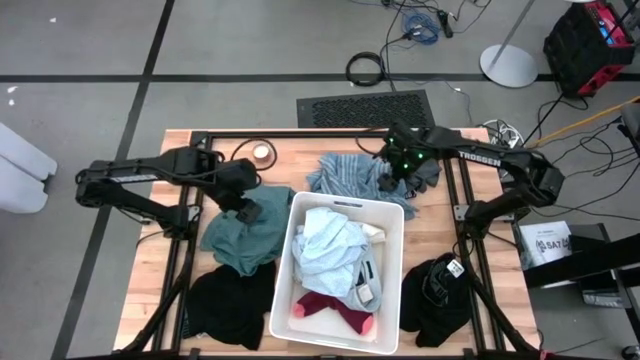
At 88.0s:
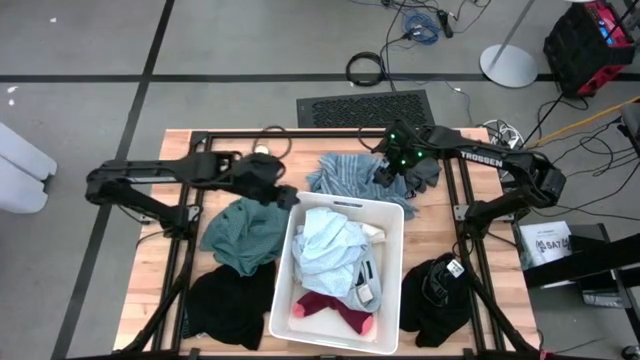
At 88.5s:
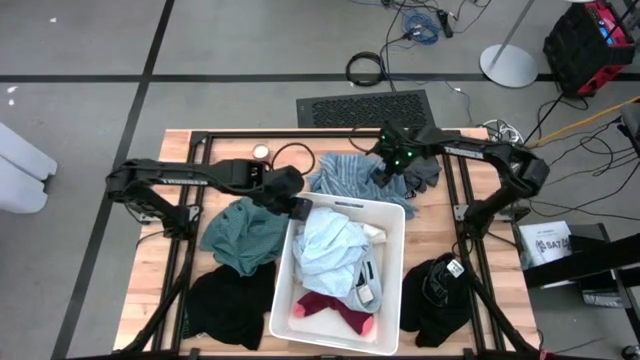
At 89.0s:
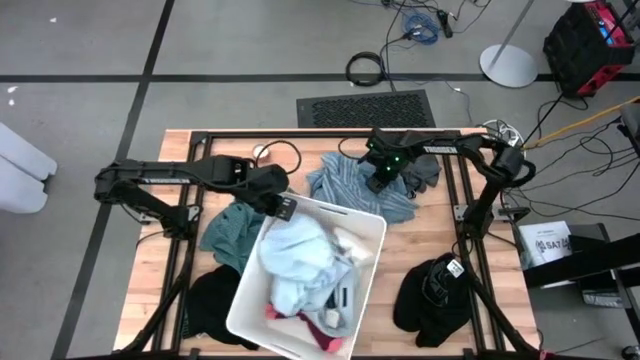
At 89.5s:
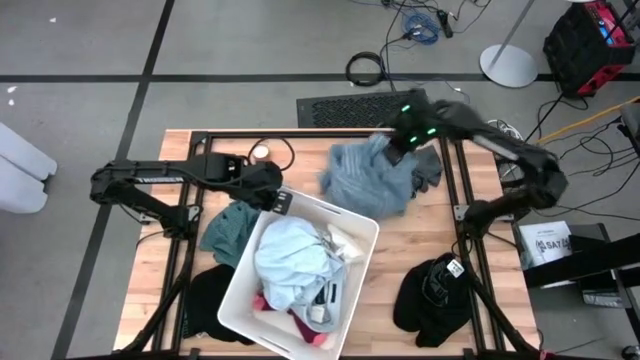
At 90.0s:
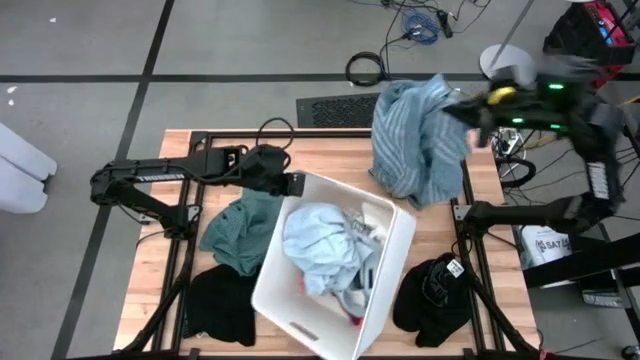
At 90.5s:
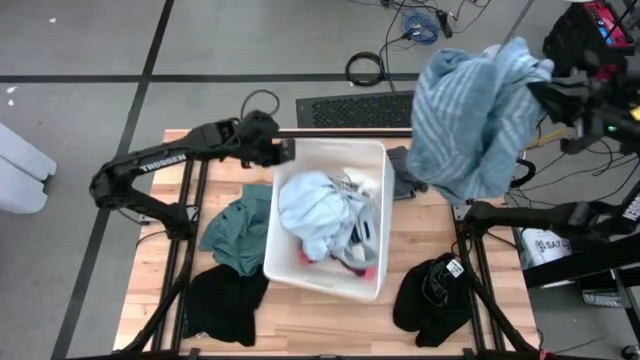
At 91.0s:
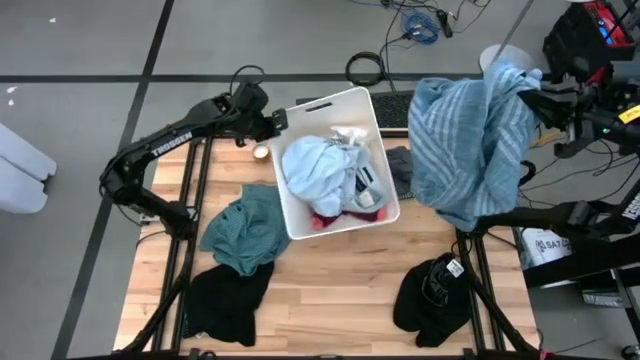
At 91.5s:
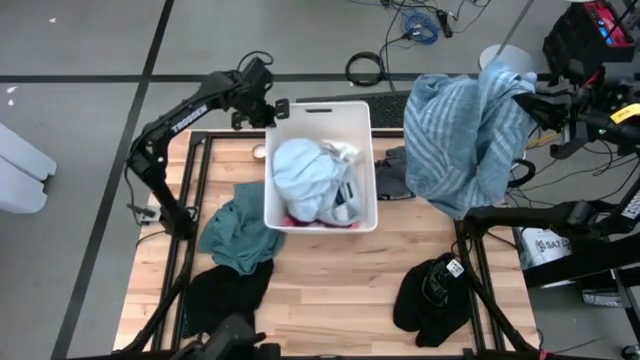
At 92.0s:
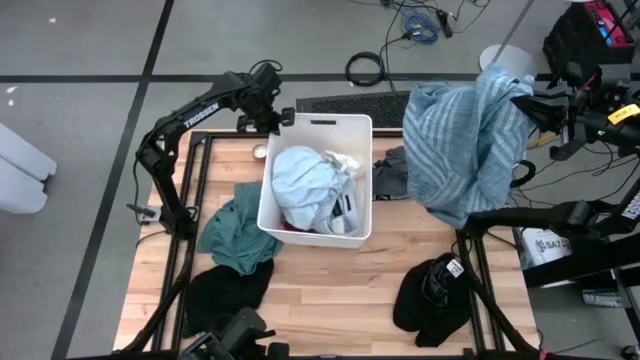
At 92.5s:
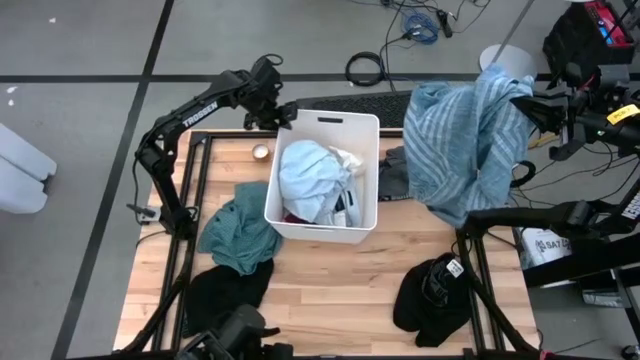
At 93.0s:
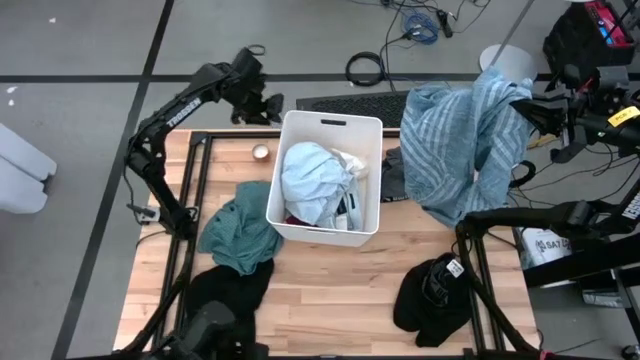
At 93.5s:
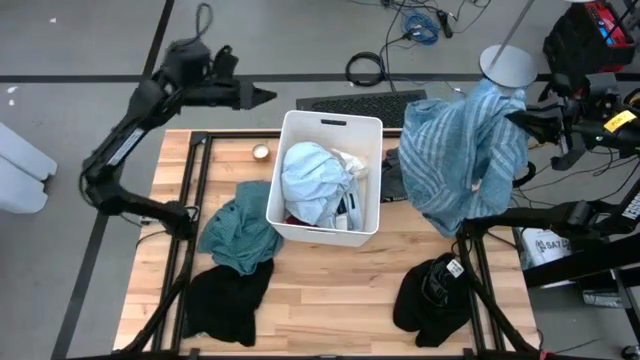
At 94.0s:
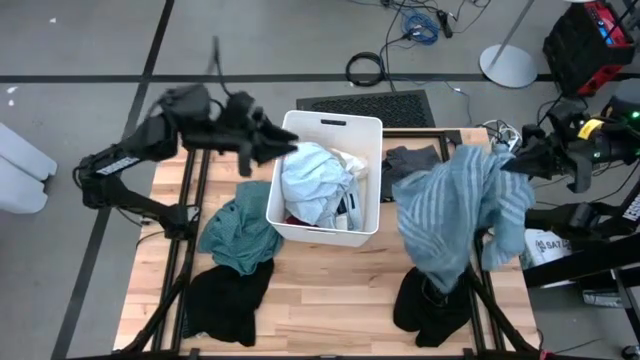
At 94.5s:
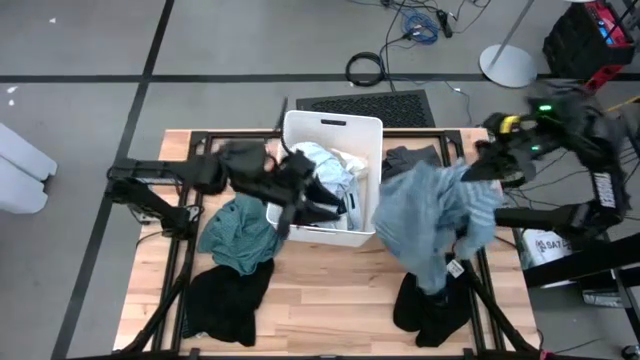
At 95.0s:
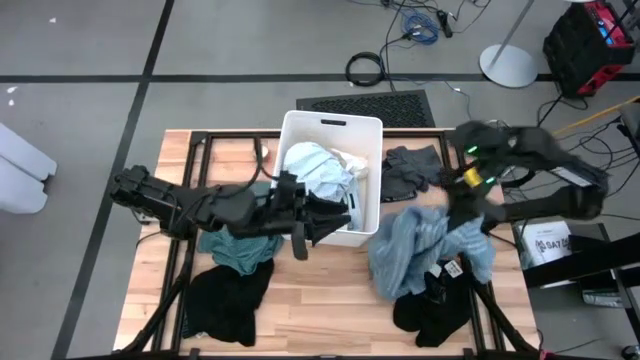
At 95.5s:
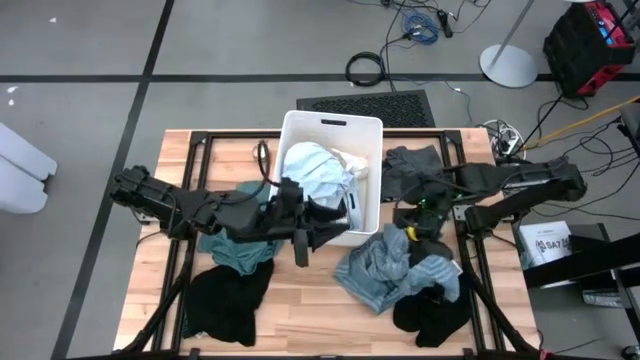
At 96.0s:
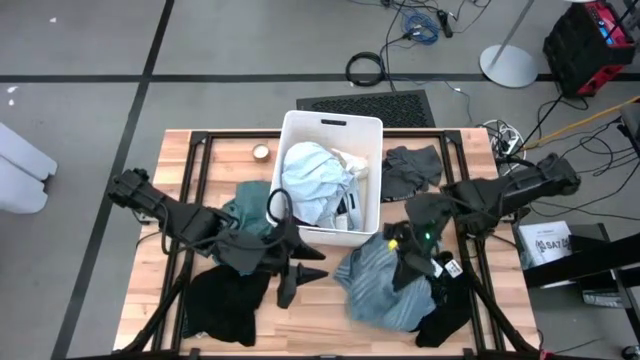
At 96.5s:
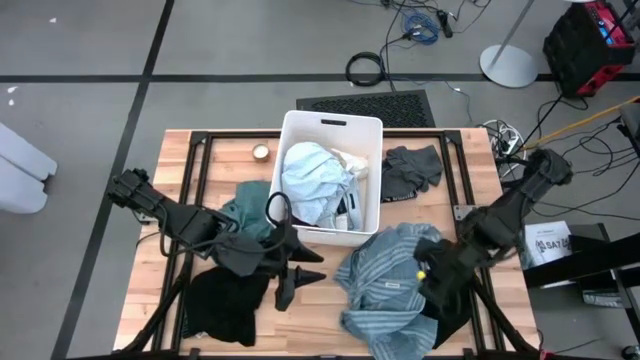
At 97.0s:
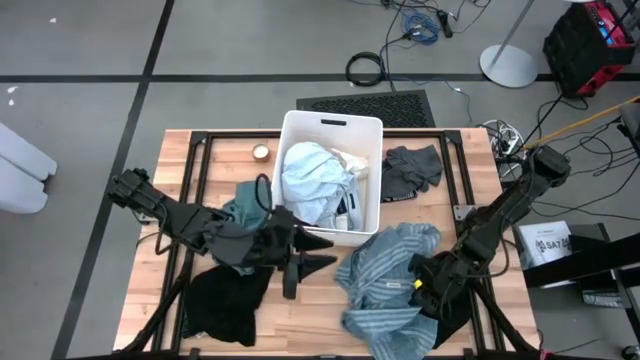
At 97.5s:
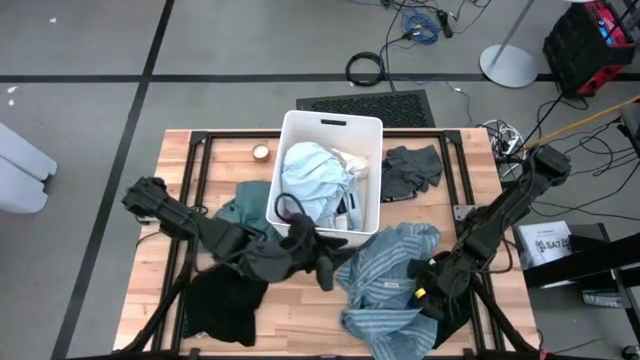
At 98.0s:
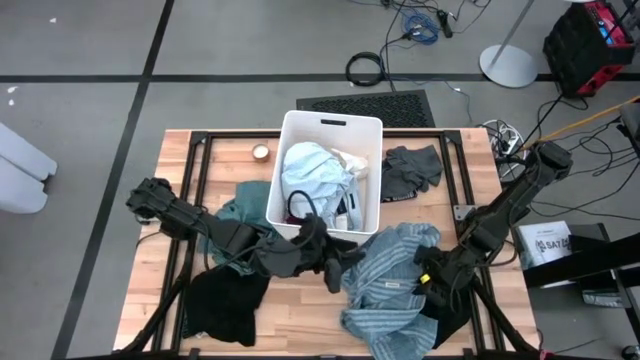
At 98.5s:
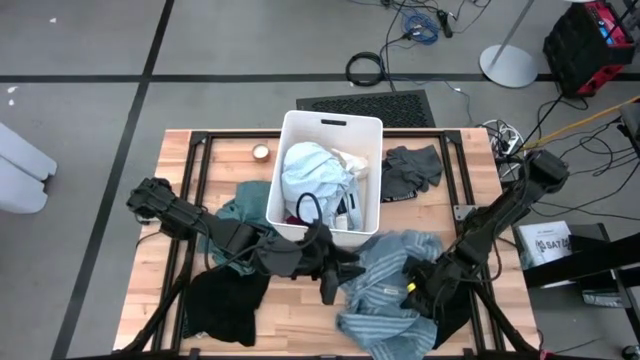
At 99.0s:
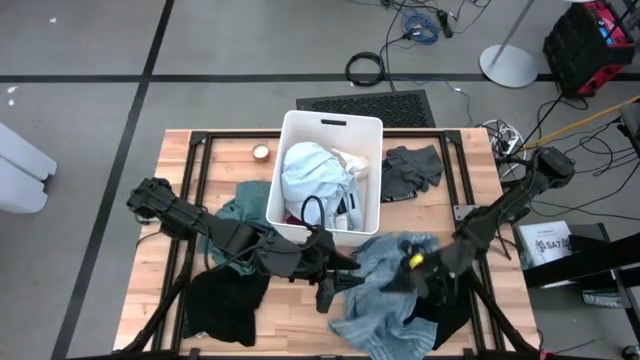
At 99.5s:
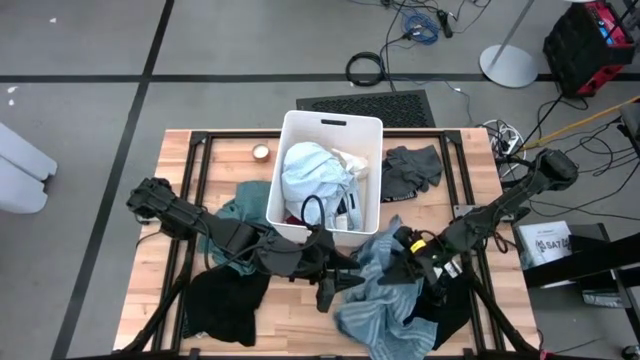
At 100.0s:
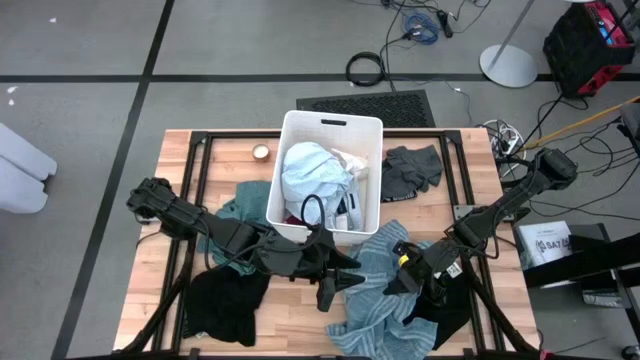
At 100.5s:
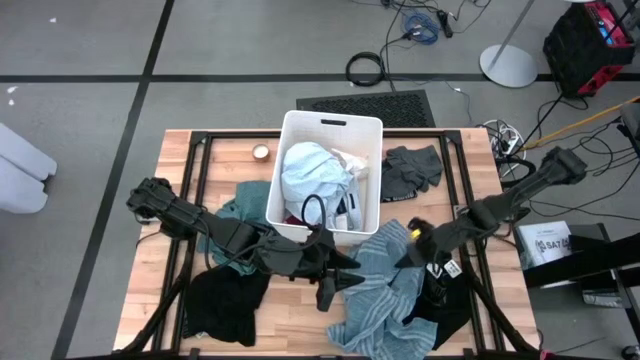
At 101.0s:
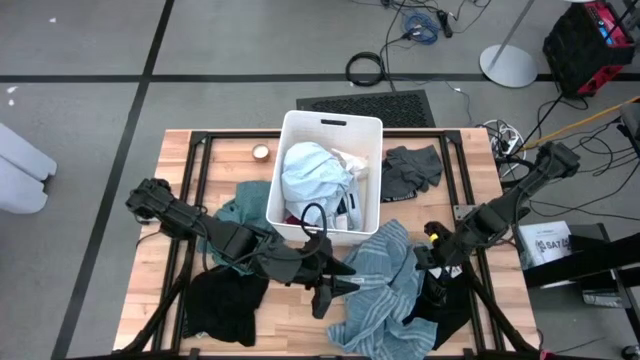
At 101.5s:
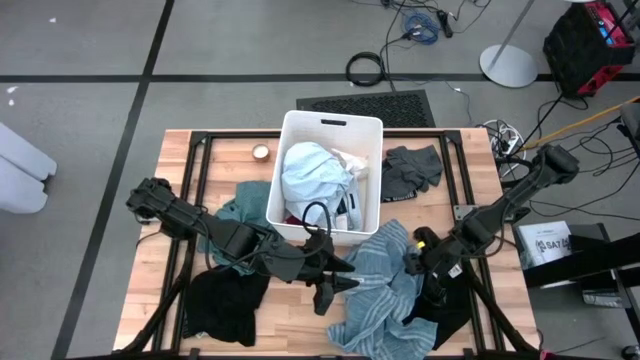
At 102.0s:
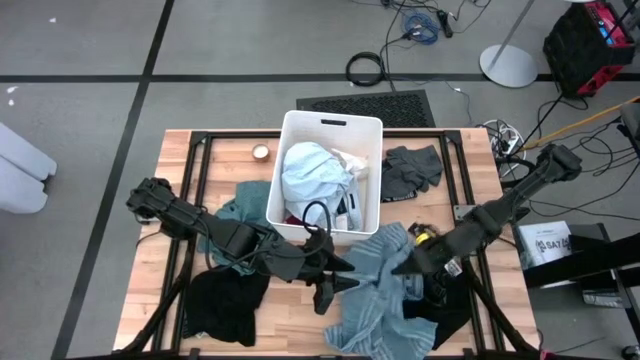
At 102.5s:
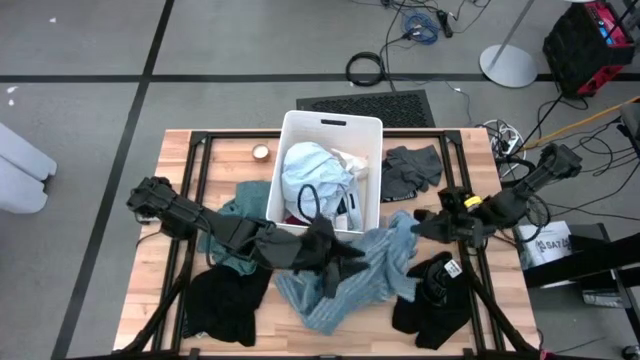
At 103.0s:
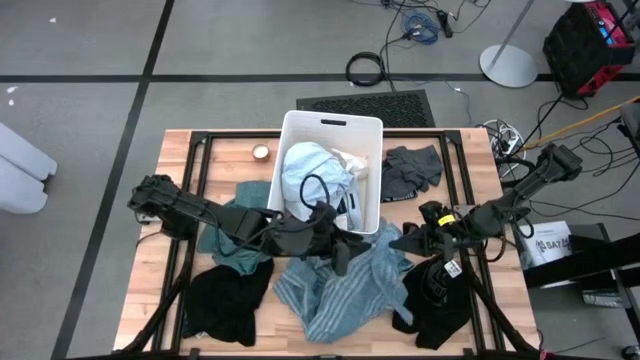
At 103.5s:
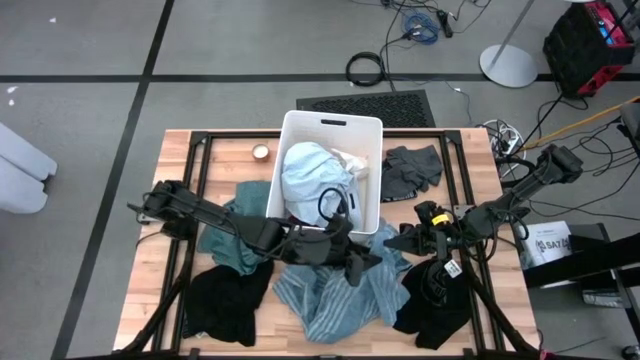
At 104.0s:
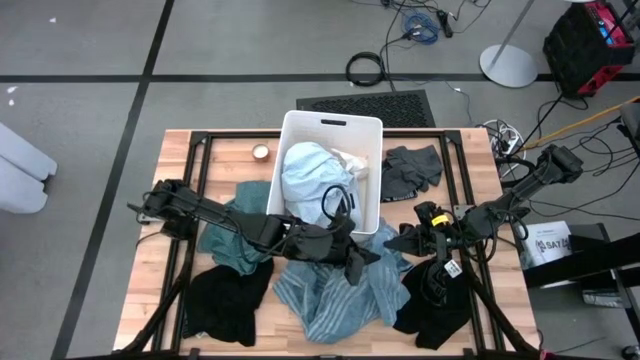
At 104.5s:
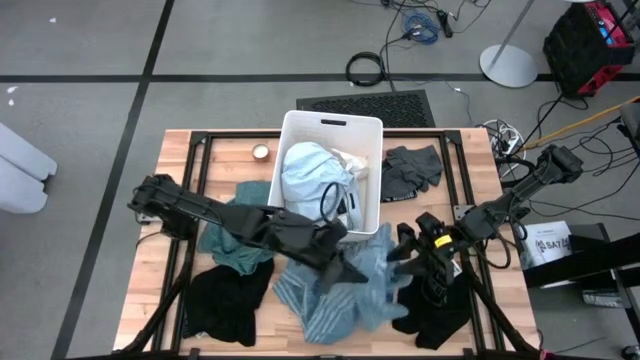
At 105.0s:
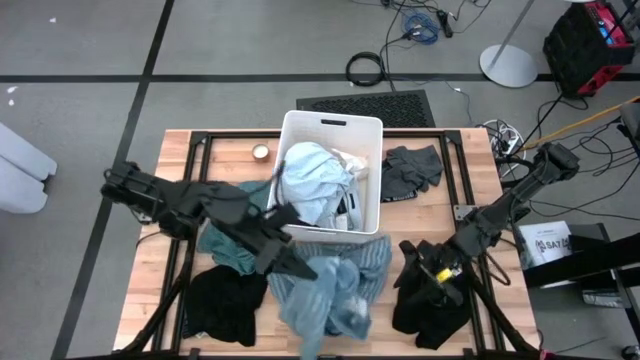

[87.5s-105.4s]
Task: Sort clothes
Put the blue polo shirt into the white laundry bin

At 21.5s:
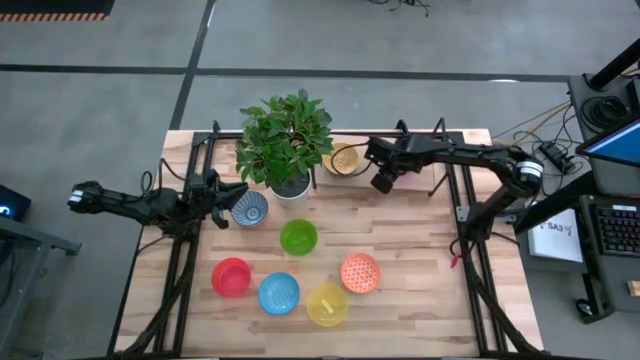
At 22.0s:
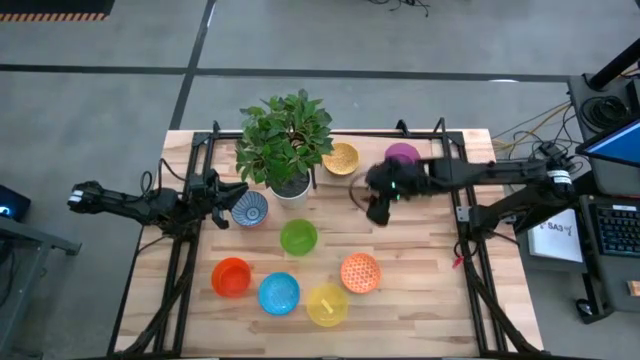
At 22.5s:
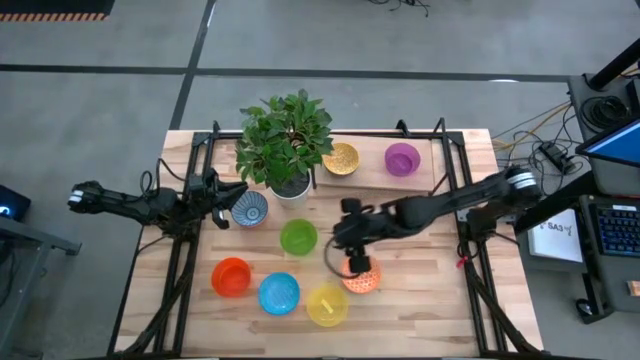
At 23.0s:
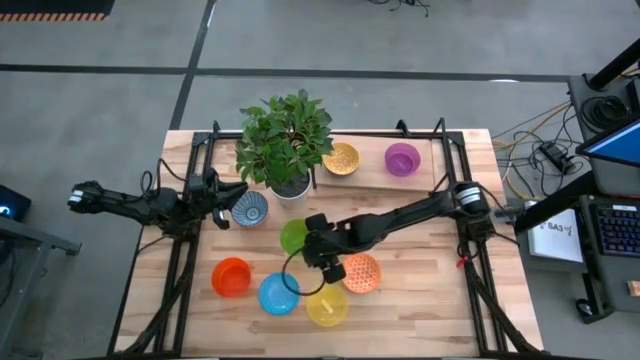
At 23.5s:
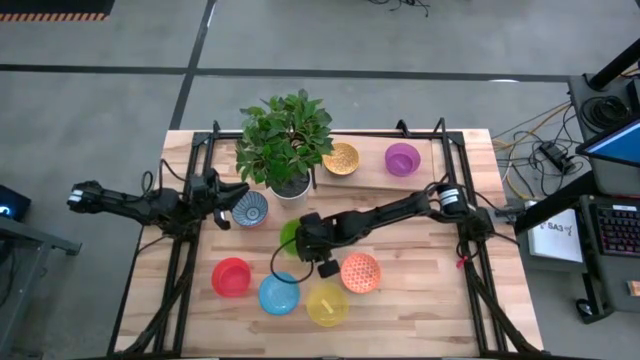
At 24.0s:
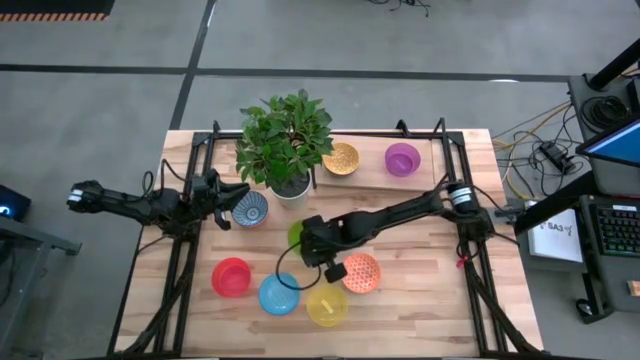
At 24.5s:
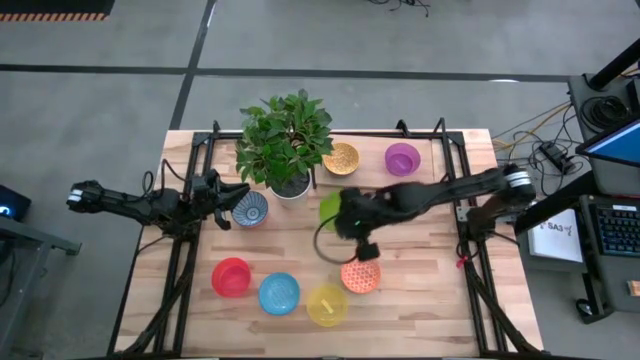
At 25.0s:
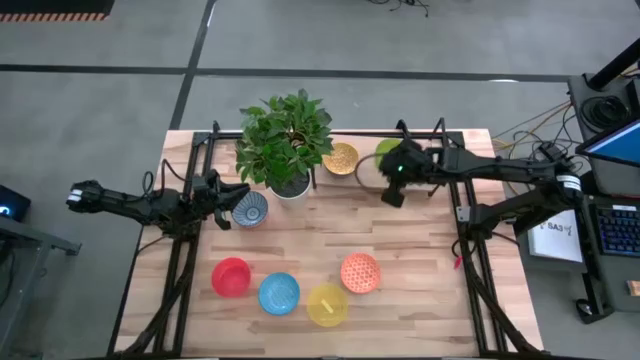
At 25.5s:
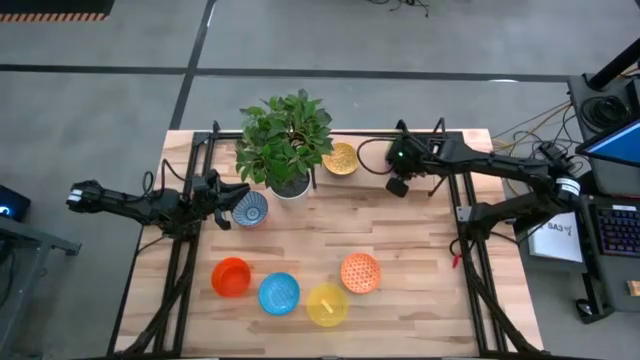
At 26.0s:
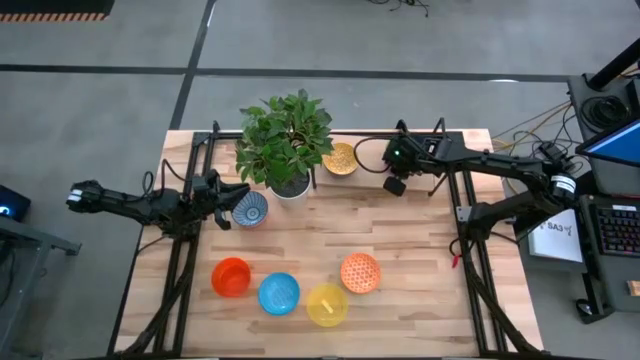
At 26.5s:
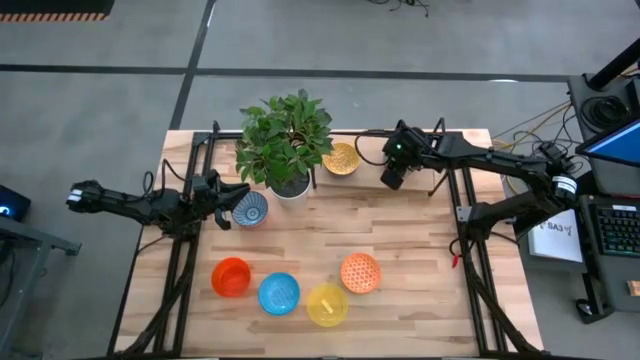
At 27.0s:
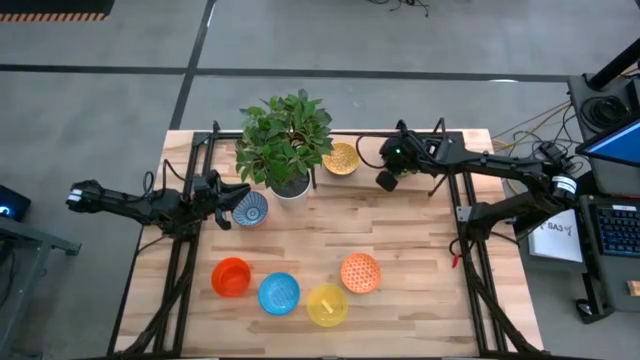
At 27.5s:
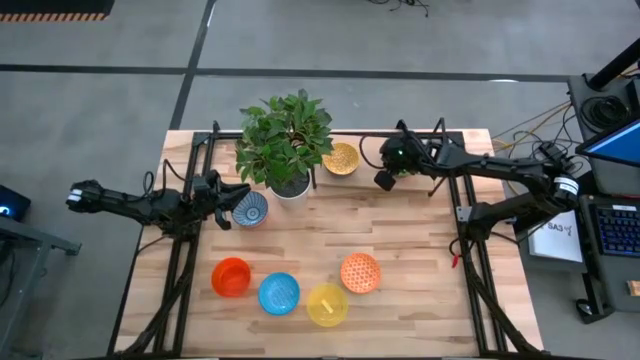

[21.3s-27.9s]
Task: Place and stack bowls onto a shelf
Stack the green bowl on the purple bowl on the shelf
